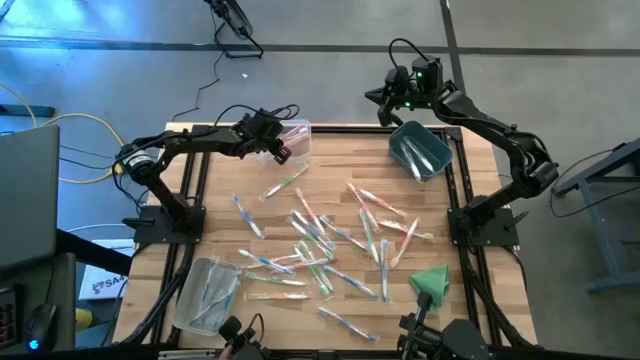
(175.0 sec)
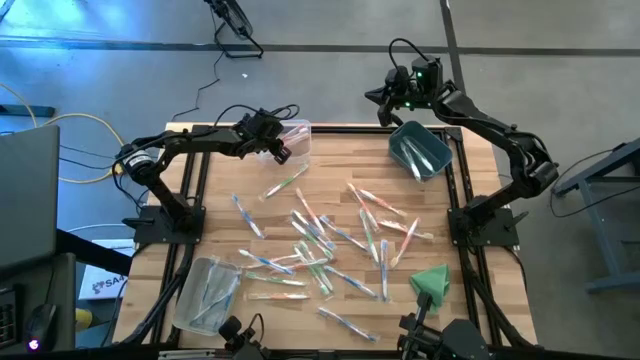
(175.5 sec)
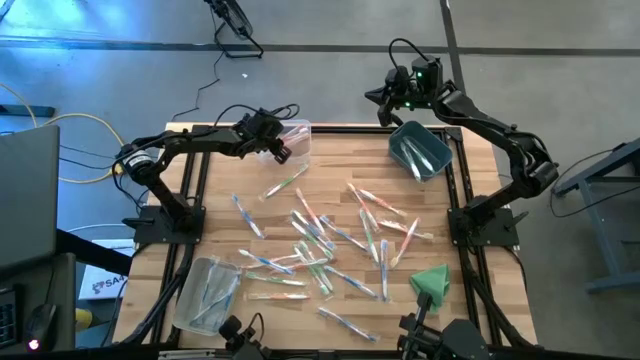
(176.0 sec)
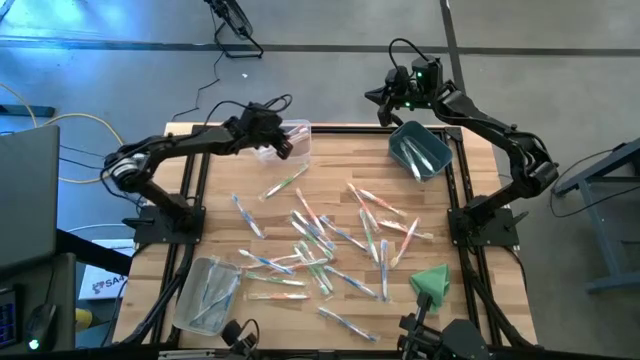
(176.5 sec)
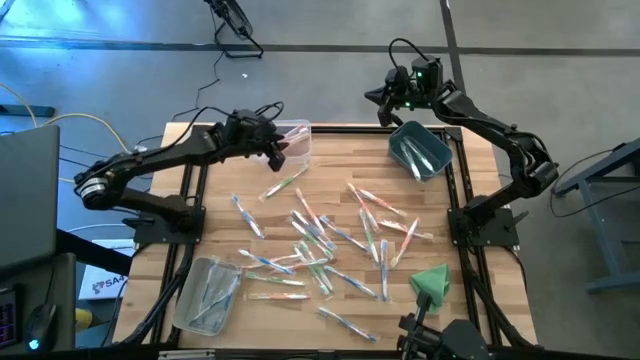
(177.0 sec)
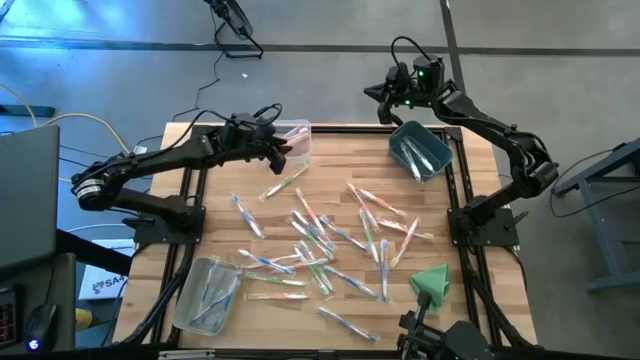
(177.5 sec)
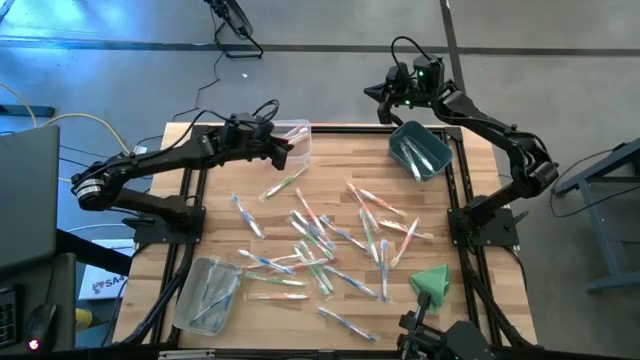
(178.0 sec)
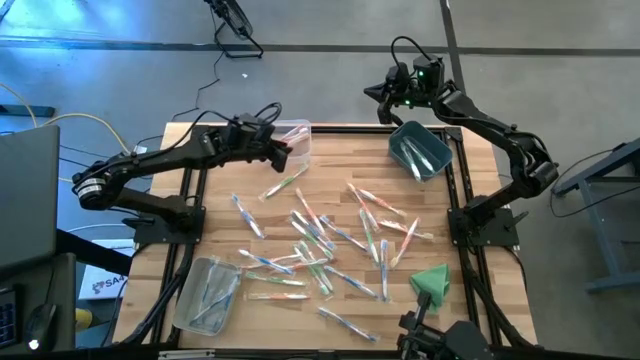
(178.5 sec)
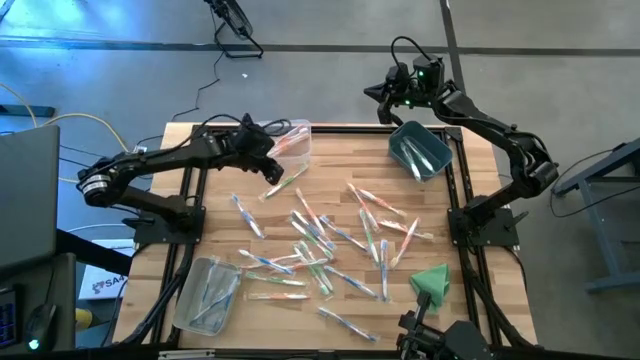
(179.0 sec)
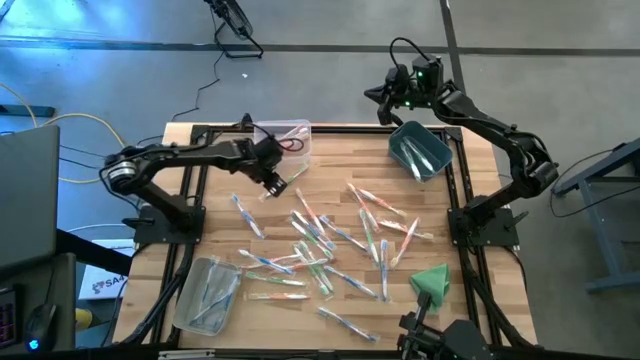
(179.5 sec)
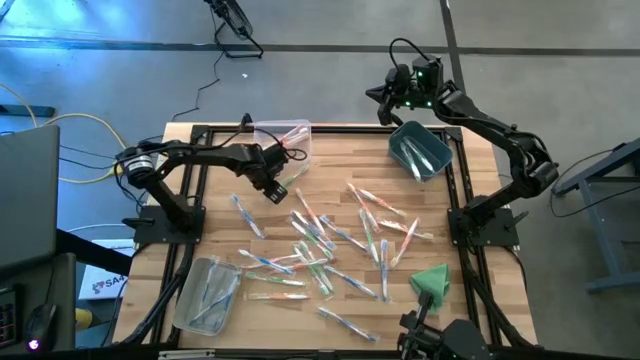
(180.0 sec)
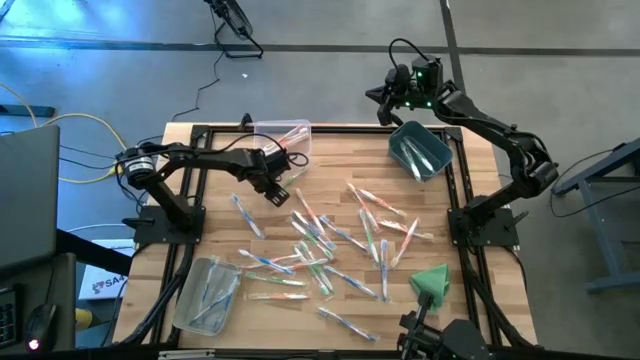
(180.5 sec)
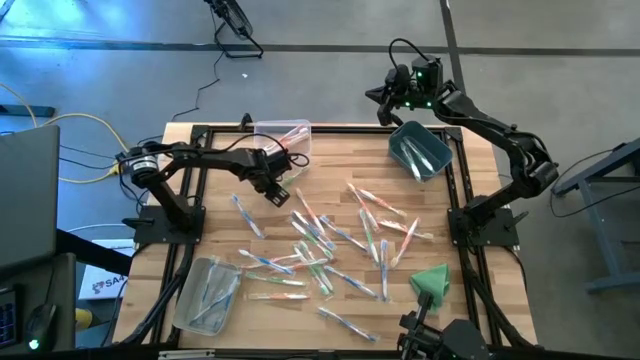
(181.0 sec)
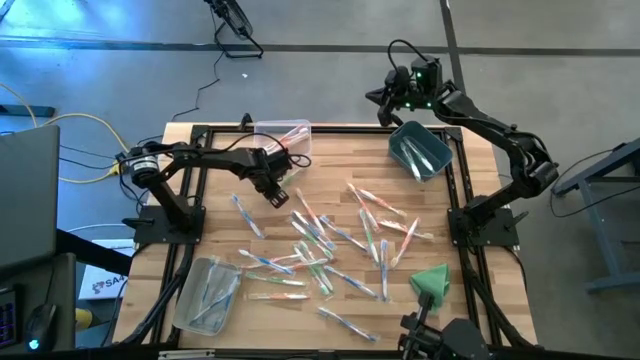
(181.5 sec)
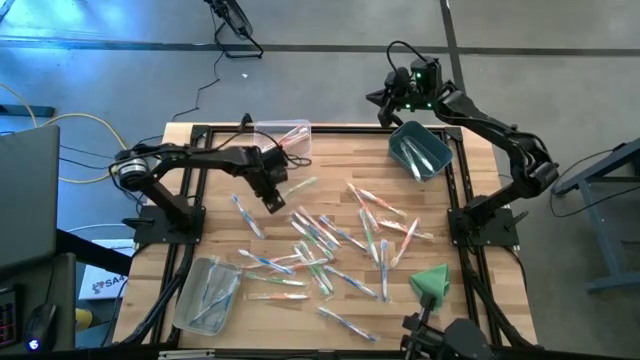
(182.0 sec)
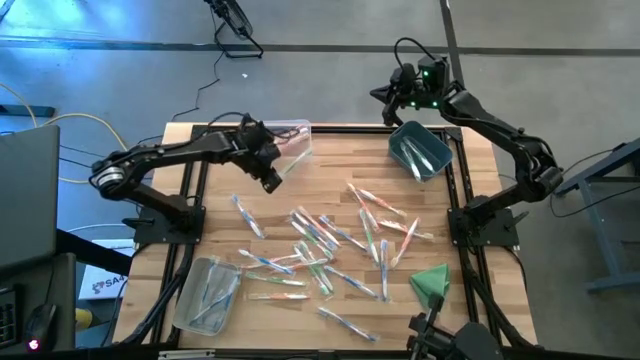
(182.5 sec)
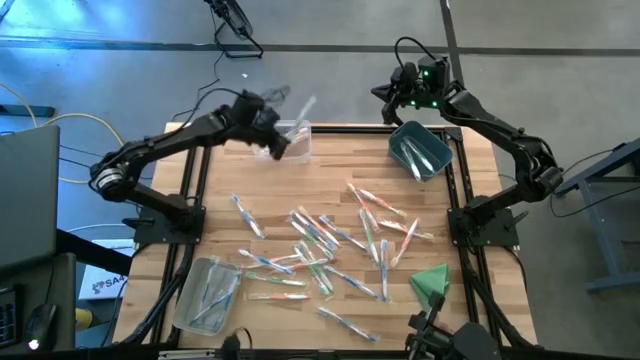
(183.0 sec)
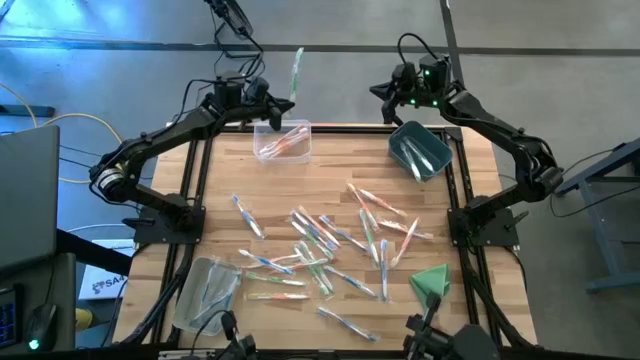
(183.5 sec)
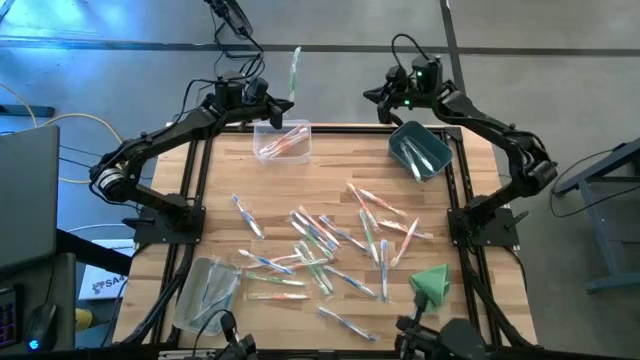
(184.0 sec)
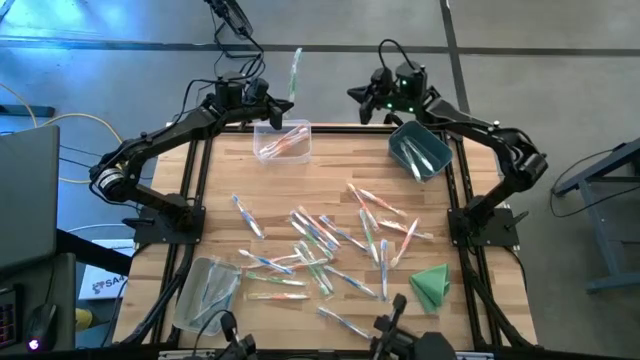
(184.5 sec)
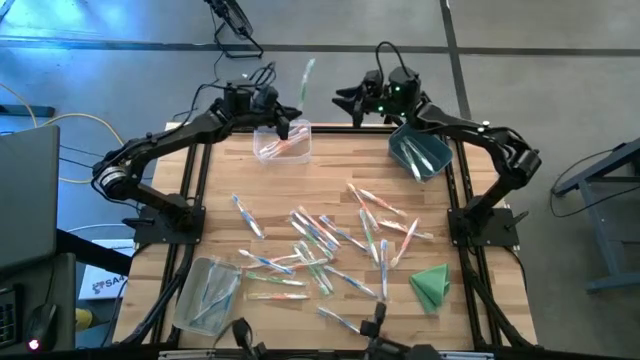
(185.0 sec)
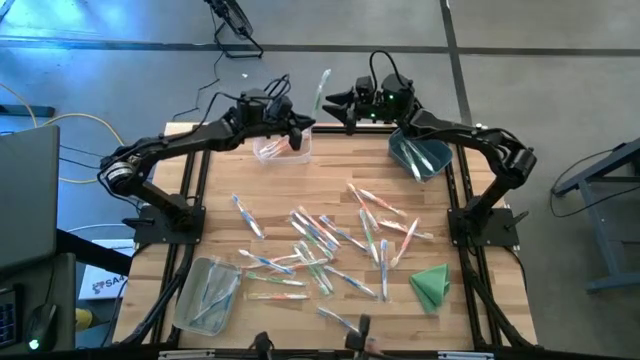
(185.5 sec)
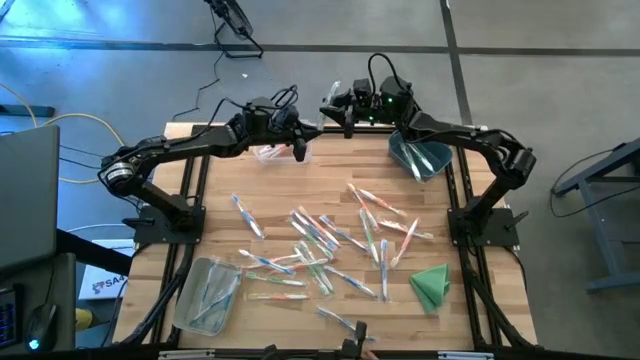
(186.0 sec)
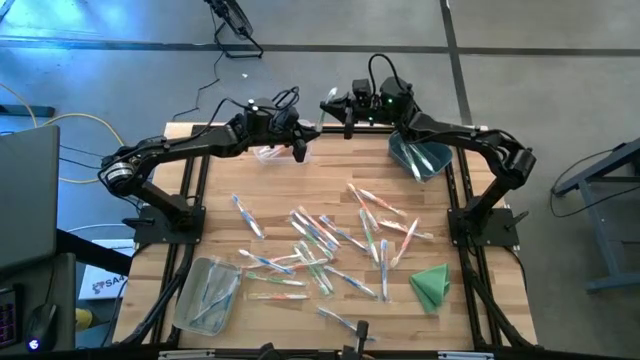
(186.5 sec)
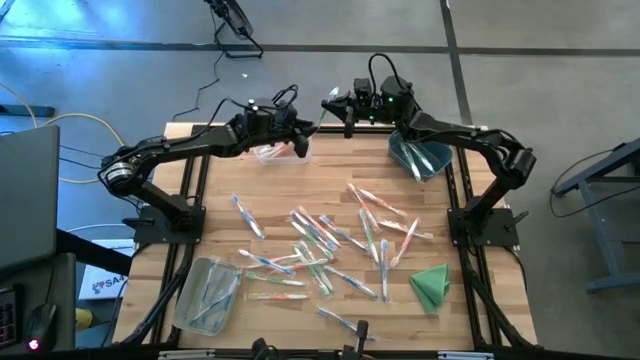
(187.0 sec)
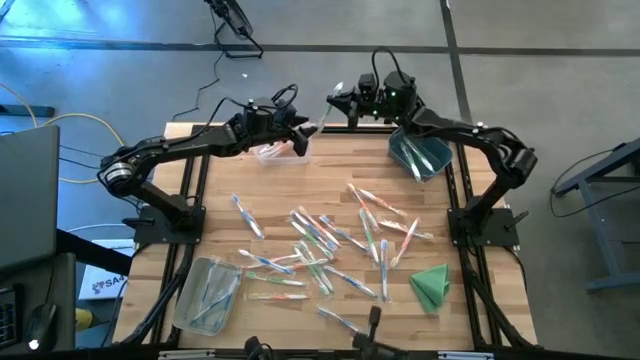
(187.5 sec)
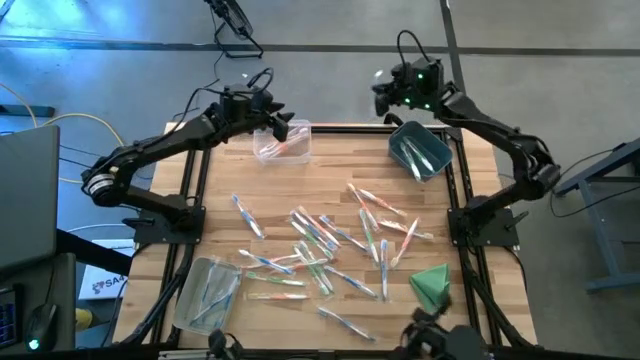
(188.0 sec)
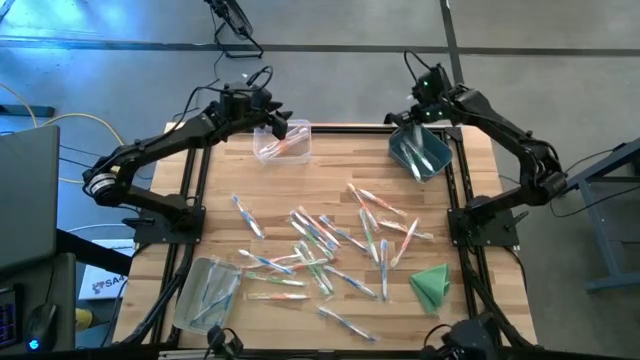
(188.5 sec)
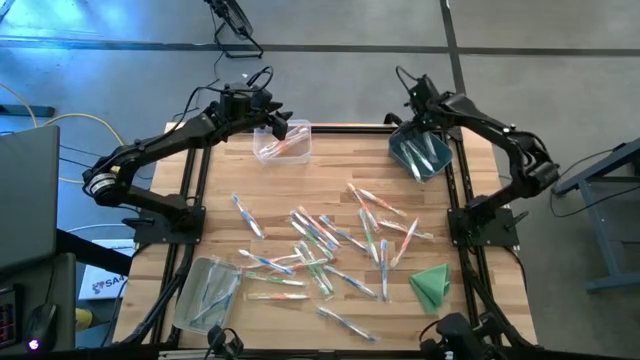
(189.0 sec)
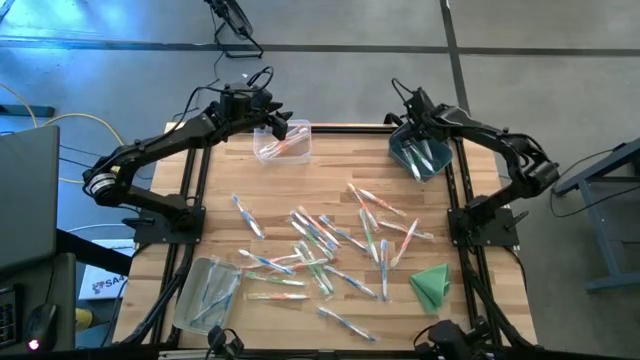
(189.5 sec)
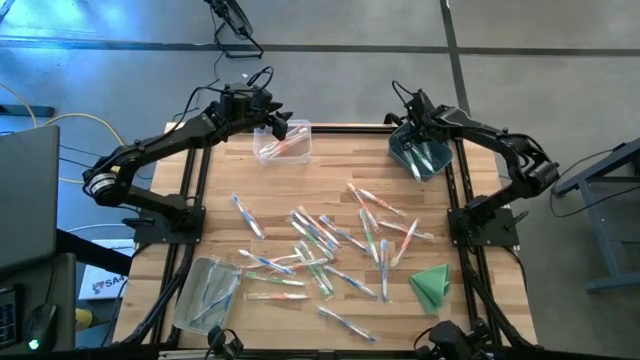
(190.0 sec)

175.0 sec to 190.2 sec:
Task: Pick & Place Toothbrushes
Put the green toothbrush into the blue bin
